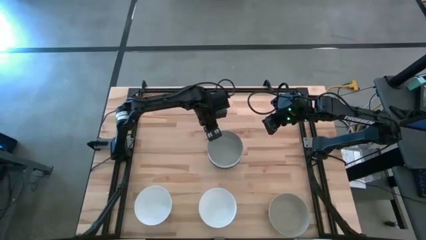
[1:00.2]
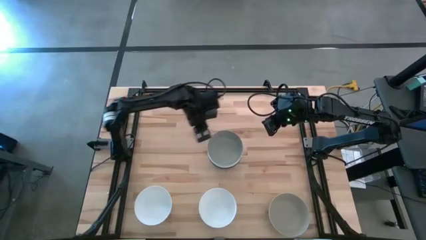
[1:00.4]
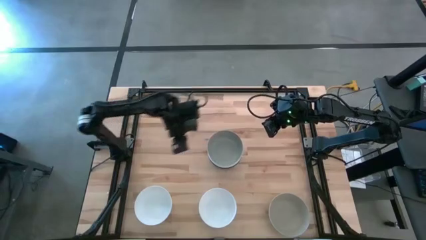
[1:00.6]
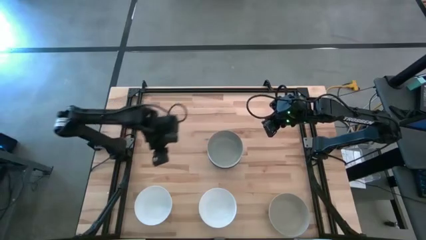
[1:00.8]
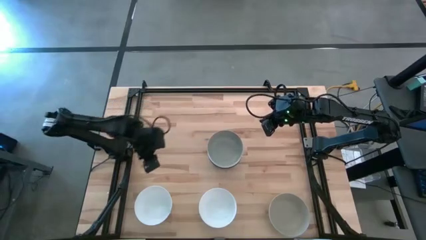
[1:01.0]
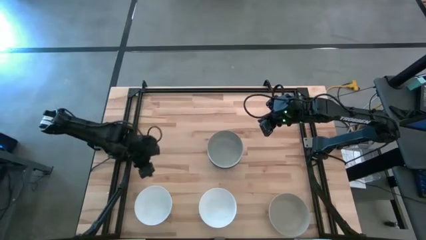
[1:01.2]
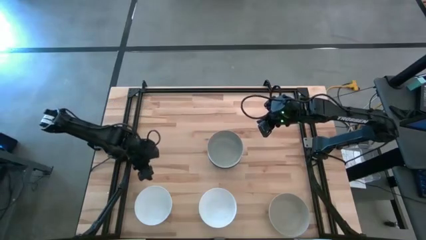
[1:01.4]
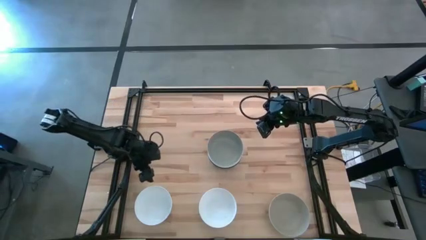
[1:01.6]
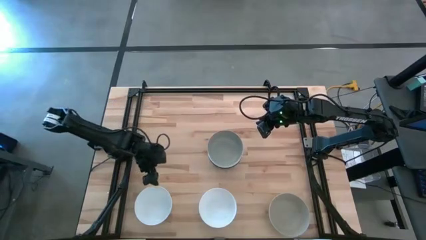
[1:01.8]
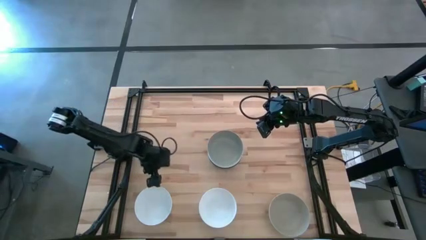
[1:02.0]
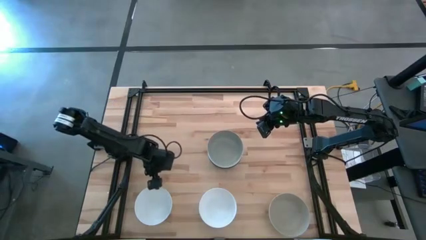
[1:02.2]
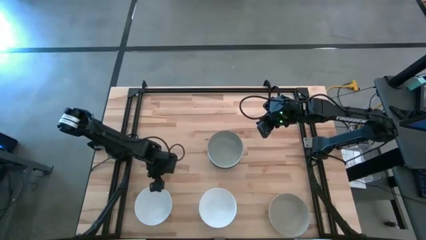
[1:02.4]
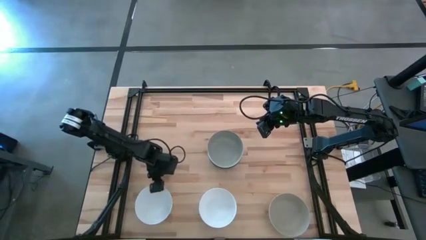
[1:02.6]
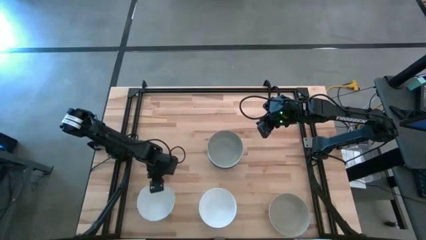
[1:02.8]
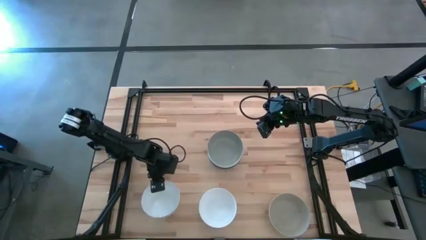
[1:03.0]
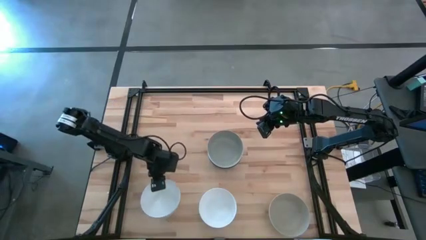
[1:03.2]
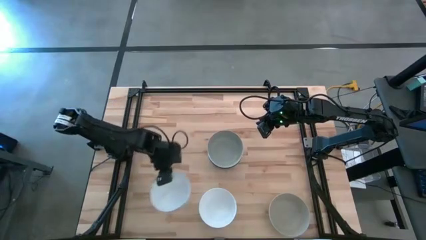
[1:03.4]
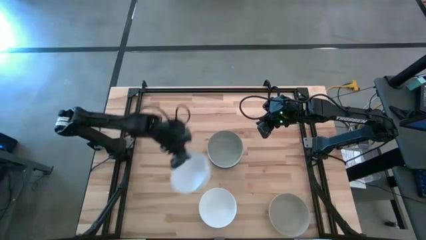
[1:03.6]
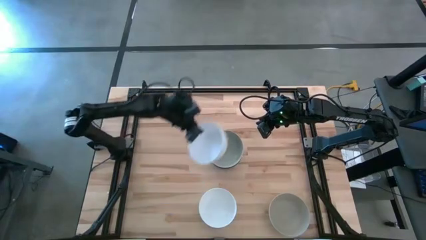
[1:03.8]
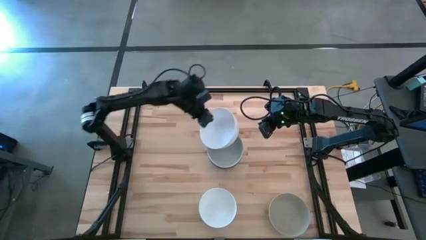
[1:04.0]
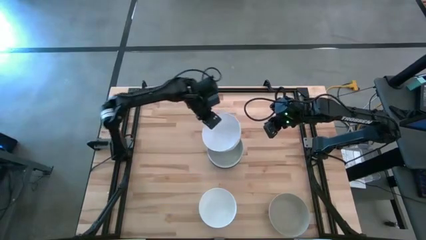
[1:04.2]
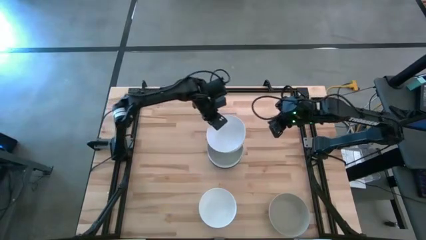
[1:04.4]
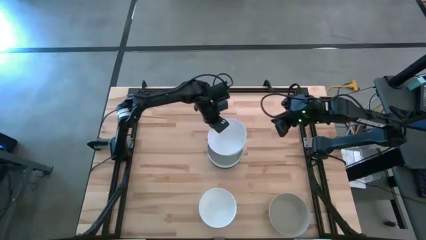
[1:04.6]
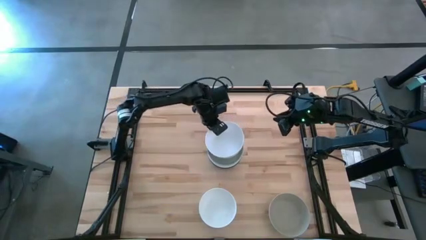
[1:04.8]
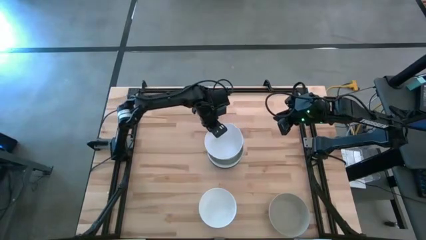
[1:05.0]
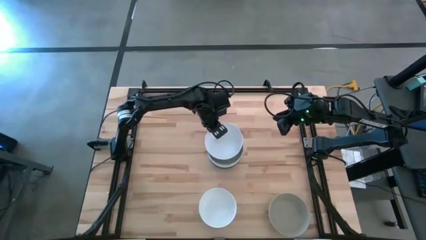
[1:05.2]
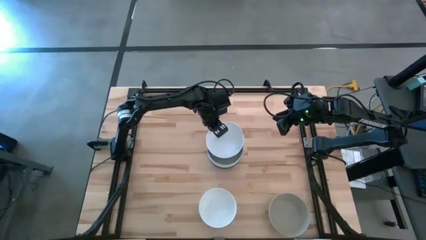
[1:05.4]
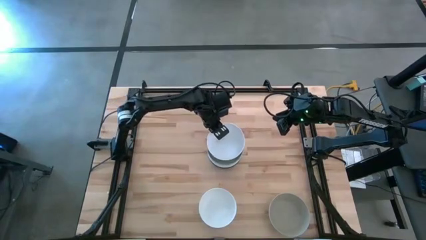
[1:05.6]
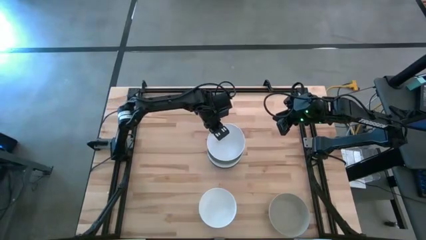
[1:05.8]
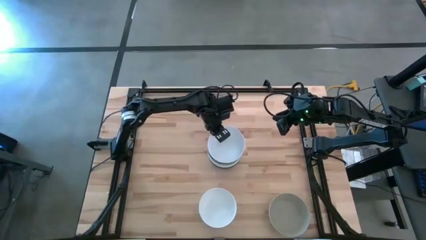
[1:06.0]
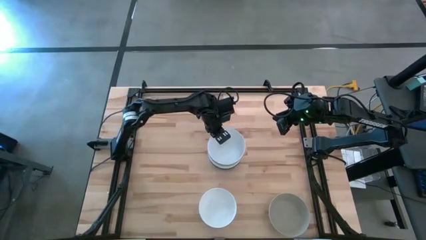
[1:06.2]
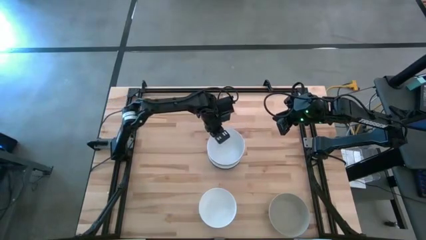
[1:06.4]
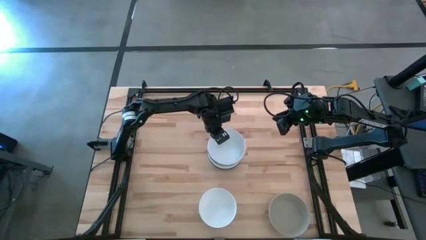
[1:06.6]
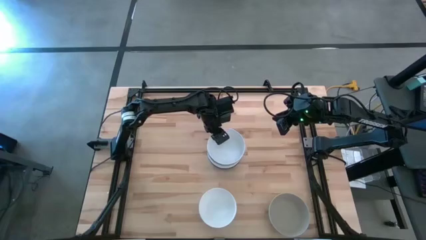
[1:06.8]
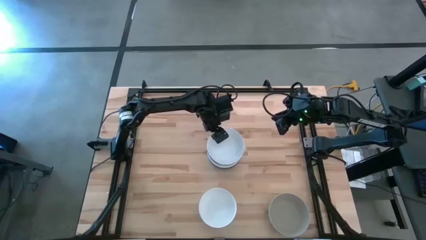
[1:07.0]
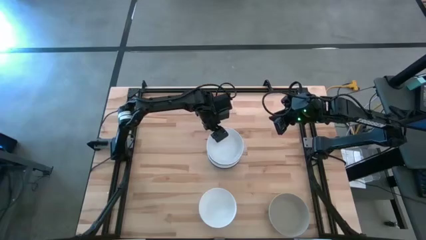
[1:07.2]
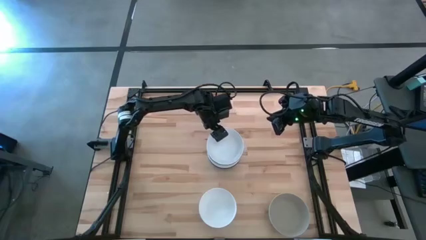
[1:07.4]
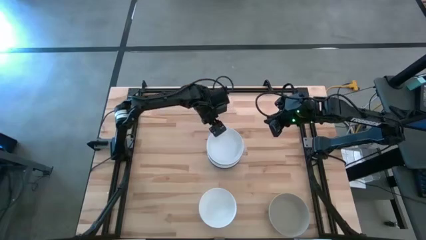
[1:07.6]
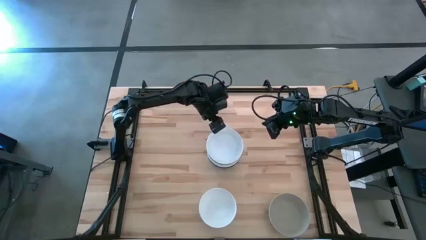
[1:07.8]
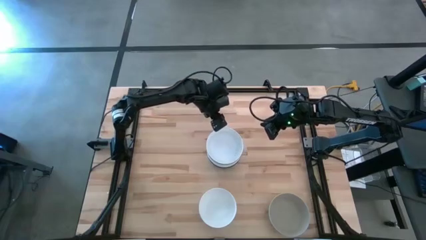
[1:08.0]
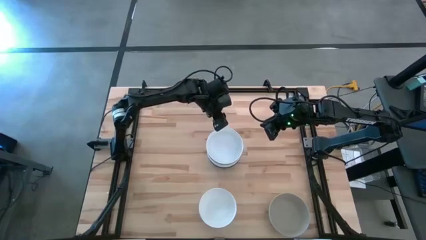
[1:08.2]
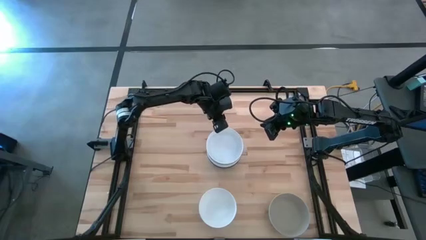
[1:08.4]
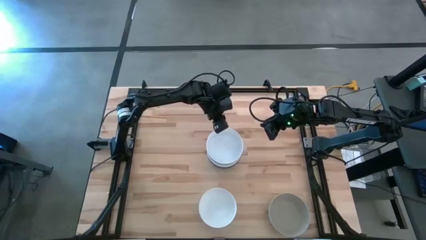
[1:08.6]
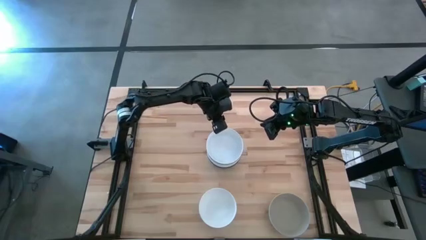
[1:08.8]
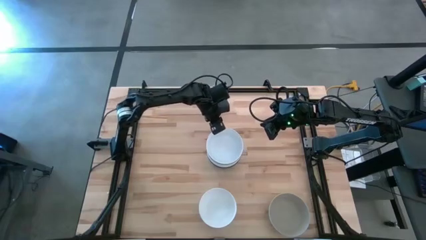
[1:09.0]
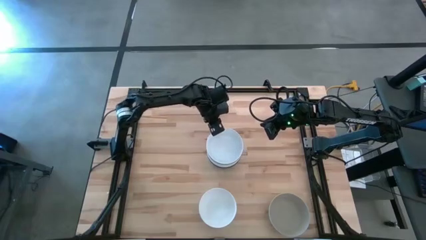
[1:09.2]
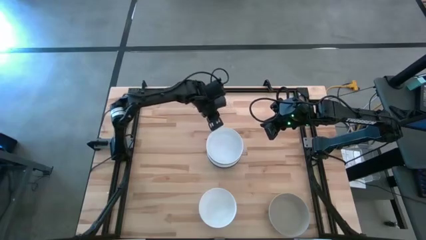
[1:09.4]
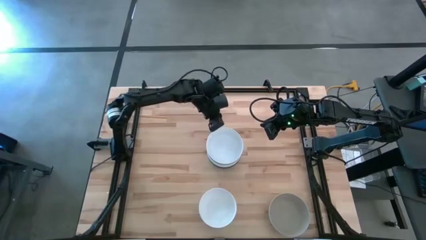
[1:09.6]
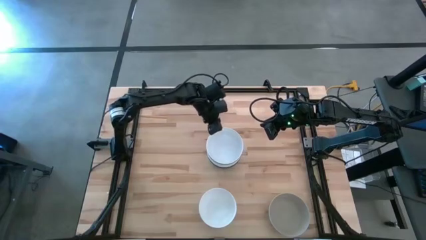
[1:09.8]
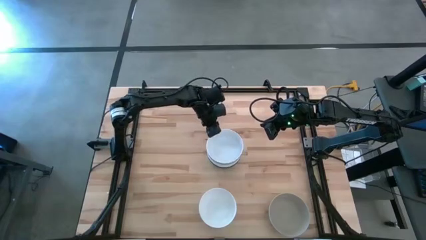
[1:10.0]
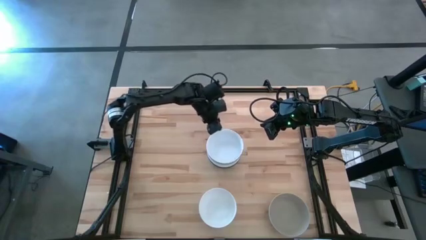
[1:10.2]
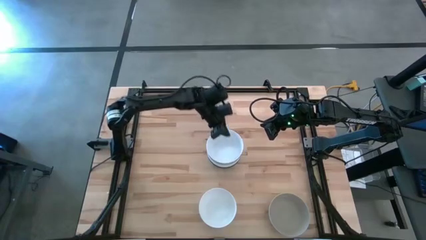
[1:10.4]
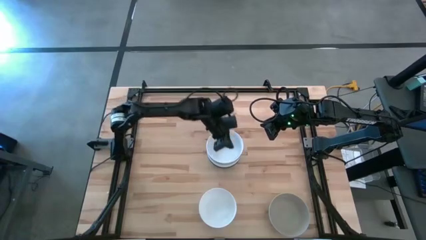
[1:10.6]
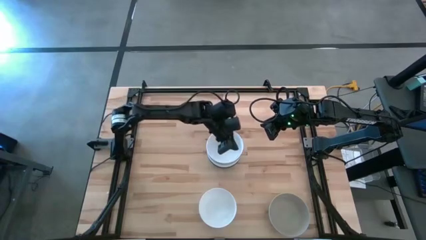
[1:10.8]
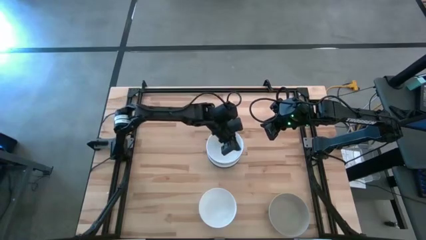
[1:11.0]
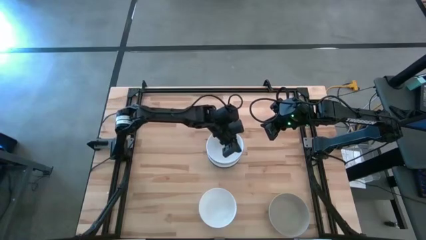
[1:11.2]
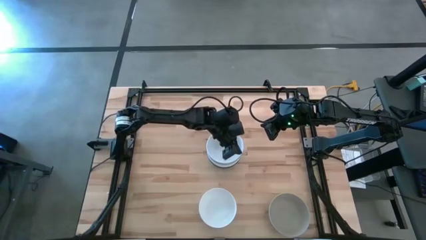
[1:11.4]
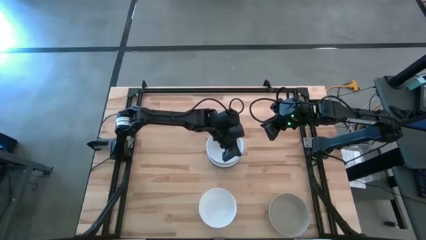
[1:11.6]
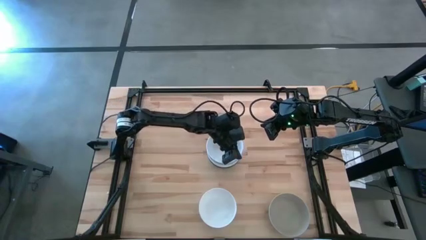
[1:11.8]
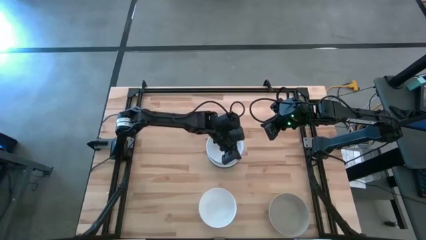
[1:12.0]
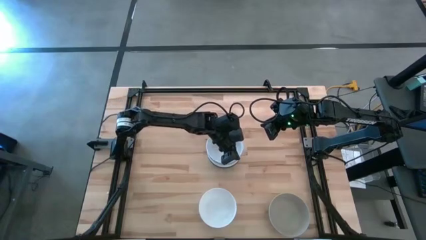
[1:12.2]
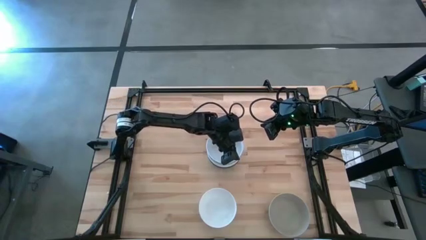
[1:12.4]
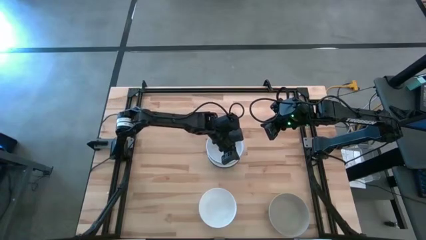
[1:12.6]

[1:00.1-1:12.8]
Task: Nest bowls inside each other
Stack the white bowl on the gray bowl

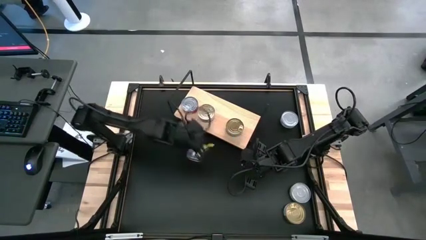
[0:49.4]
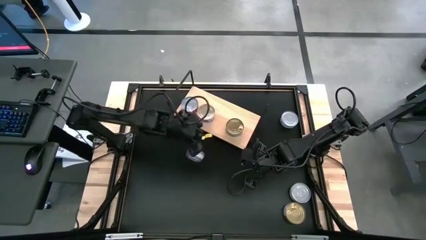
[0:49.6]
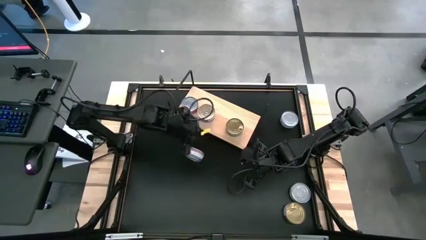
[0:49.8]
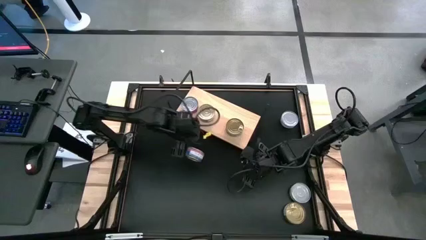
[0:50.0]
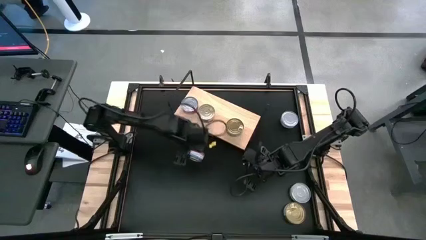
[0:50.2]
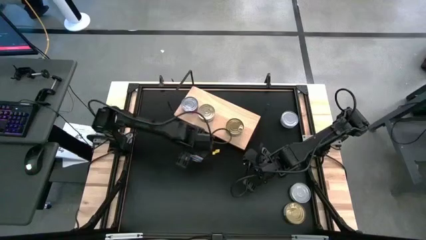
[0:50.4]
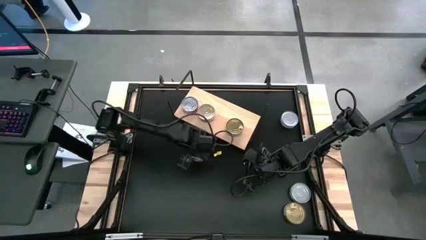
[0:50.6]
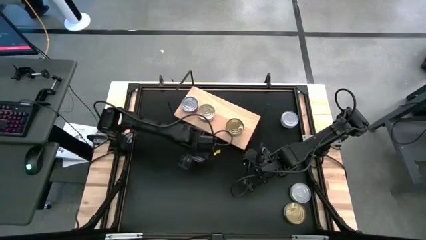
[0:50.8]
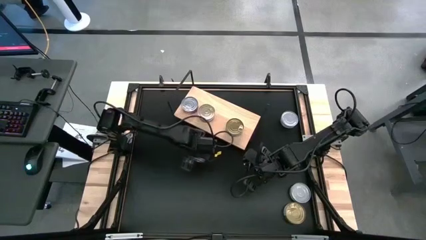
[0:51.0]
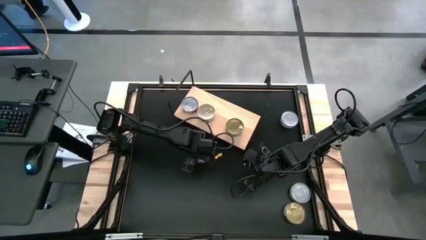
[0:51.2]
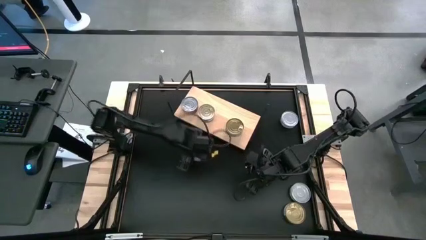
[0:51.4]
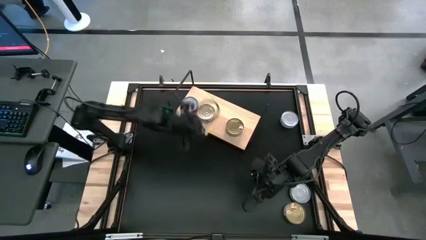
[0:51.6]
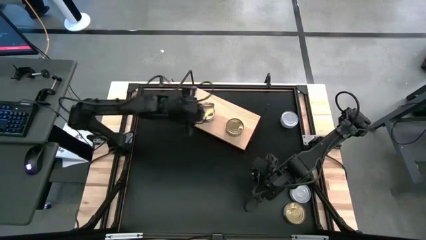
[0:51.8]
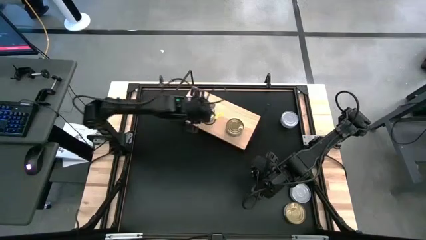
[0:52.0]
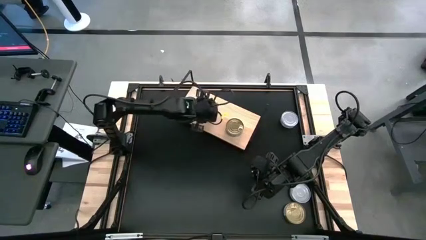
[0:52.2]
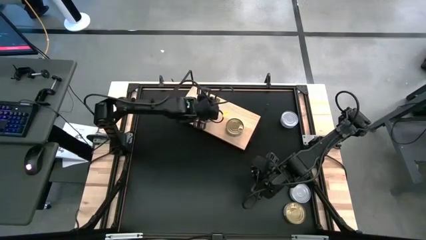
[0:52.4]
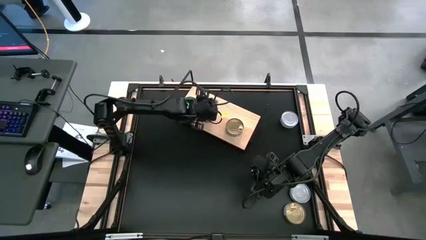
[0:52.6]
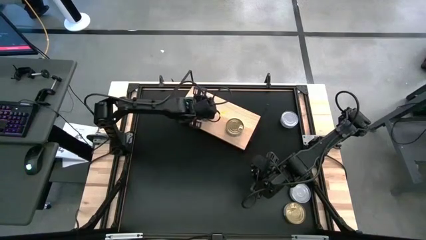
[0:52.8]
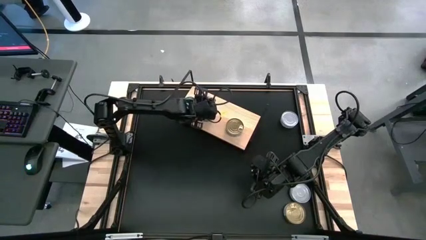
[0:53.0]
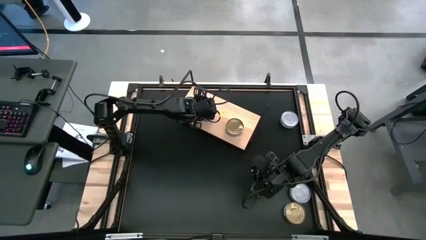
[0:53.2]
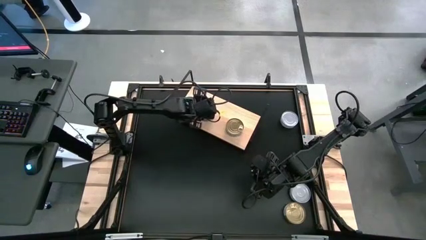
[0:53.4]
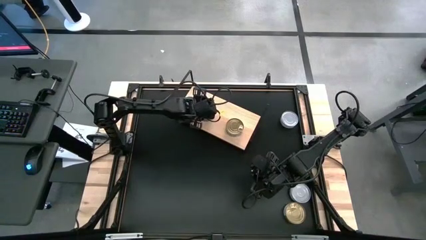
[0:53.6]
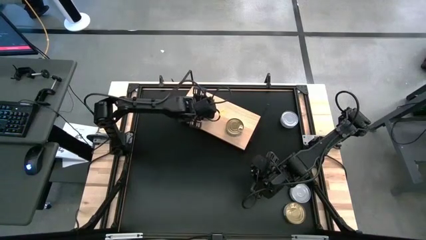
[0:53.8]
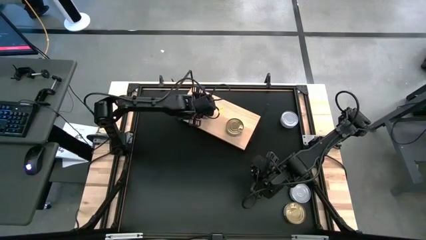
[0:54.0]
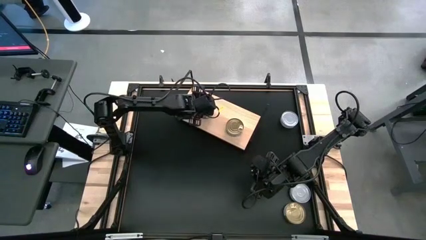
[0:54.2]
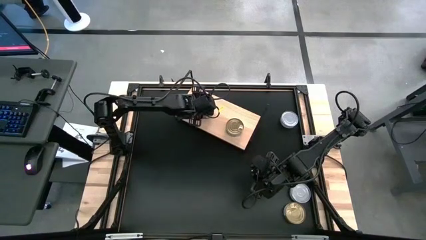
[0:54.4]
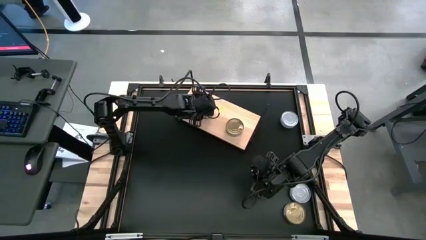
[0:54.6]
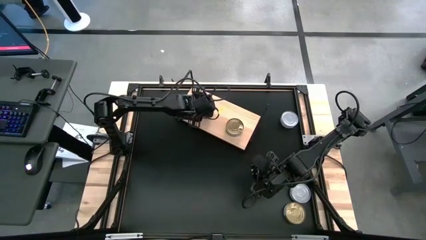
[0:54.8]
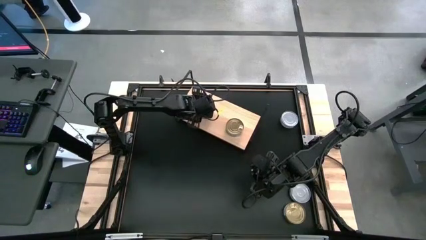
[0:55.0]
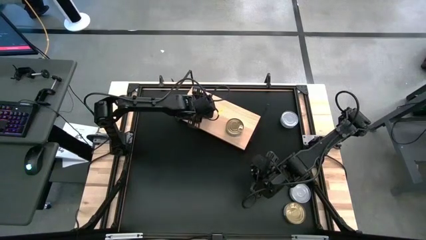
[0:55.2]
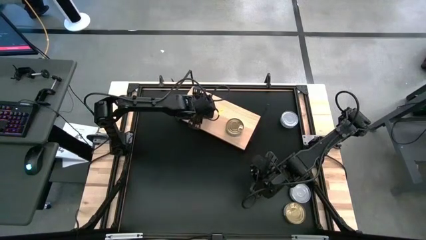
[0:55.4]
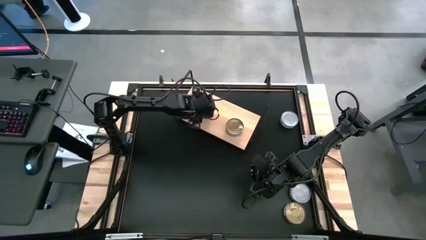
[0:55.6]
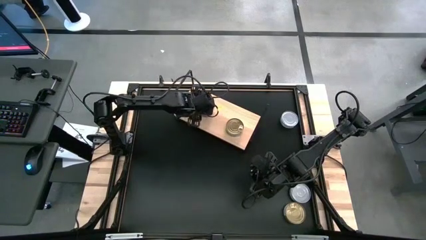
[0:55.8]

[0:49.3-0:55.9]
Task: Stack canned seafood by type on shelf
Stack the blue-pink tuna can on top of the blue-pink tuna can on the shelf
